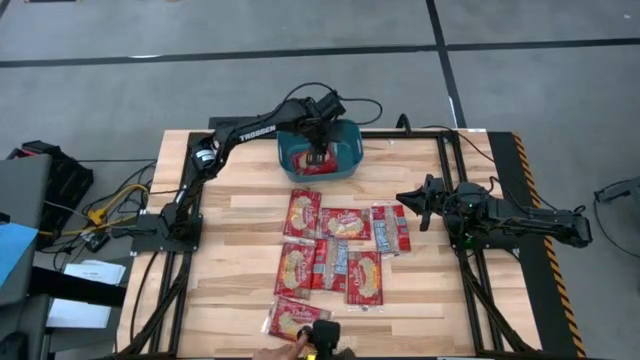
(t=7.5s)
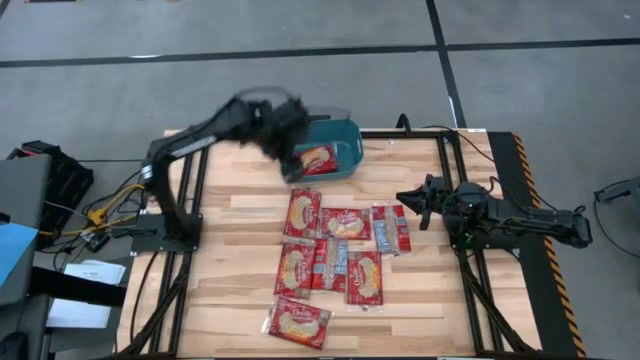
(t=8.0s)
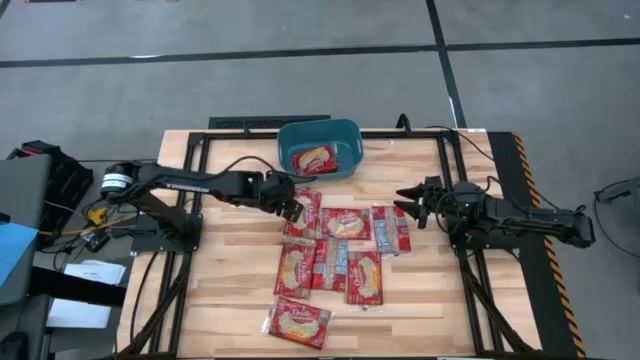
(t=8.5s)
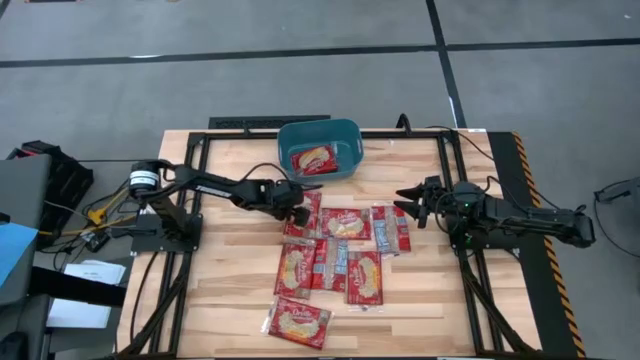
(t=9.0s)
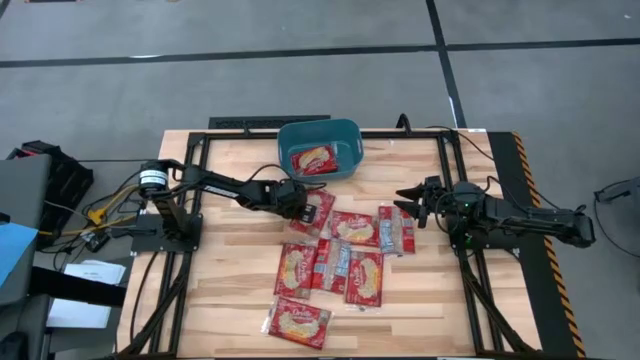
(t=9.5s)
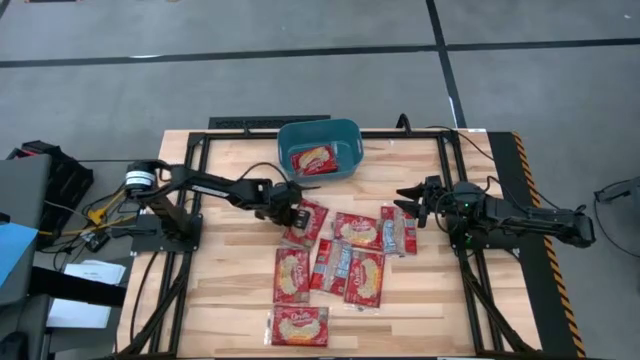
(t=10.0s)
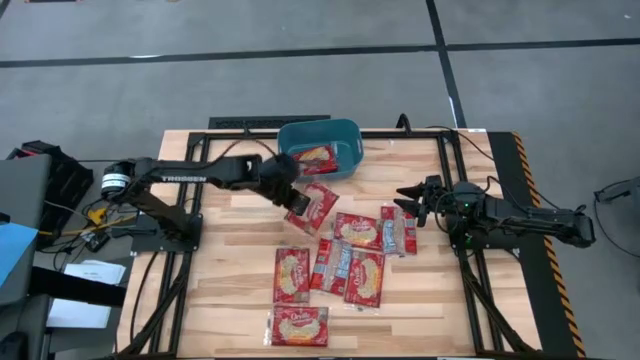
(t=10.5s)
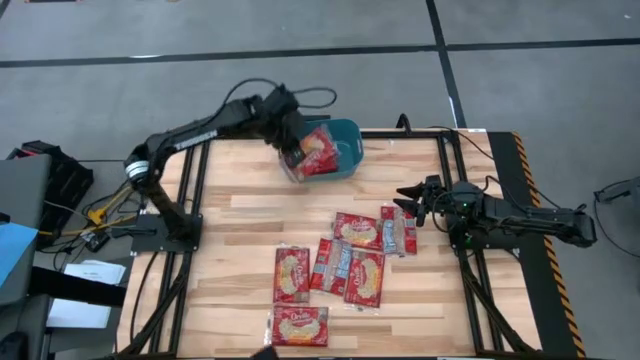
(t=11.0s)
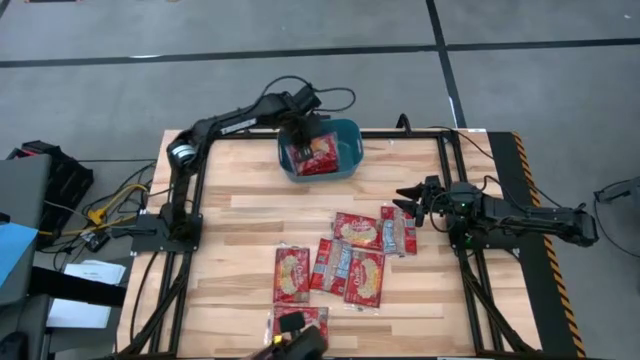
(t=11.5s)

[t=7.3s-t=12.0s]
Task: Sort popcorn bags into baskets
Put the red popcorn bag into the blue bin

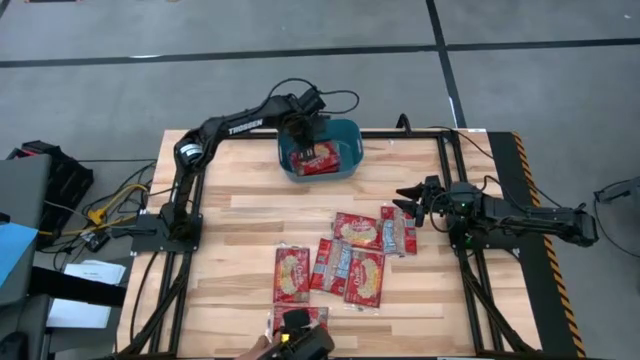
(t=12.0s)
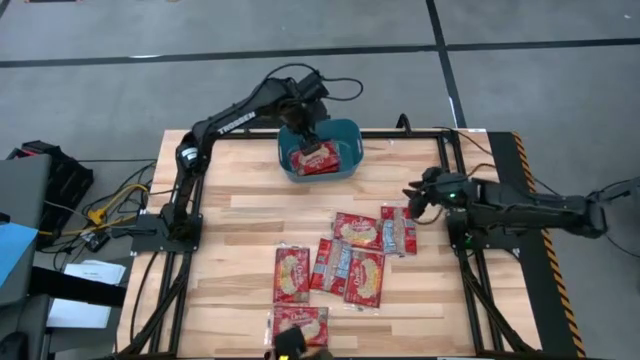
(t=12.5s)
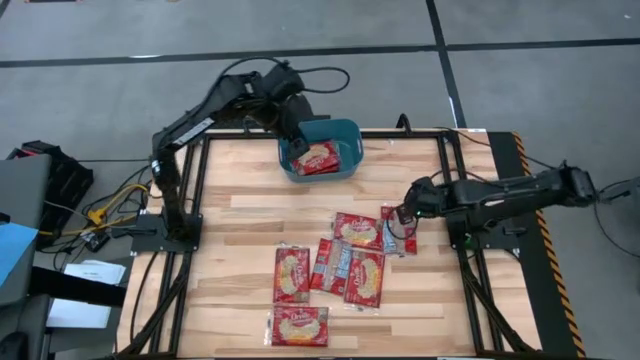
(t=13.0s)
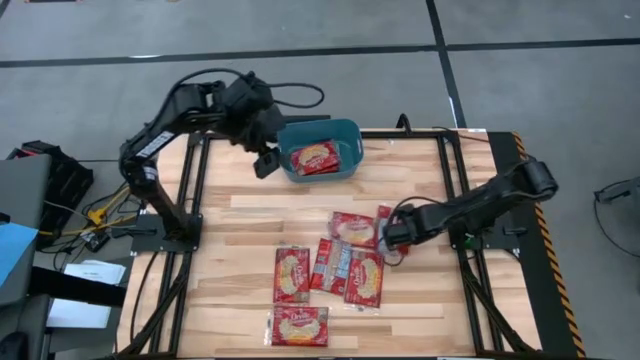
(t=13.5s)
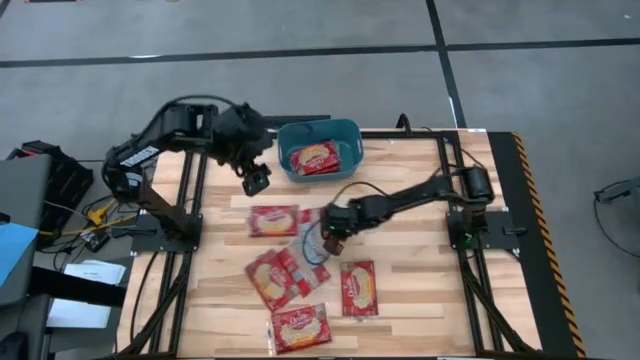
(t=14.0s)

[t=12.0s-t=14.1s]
Move the red popcorn bag to the center of the table

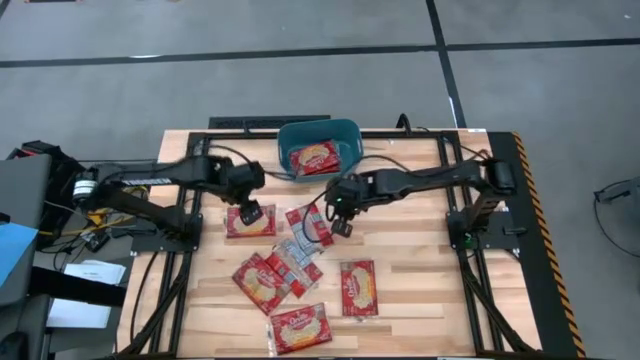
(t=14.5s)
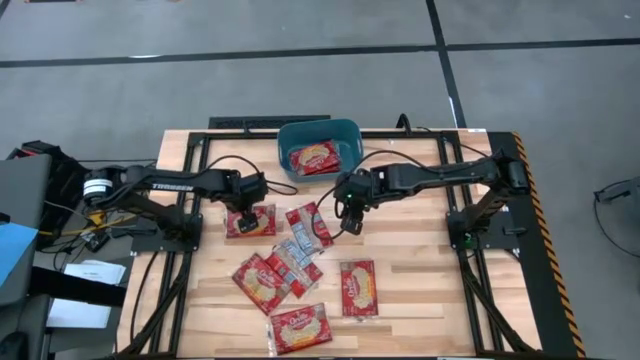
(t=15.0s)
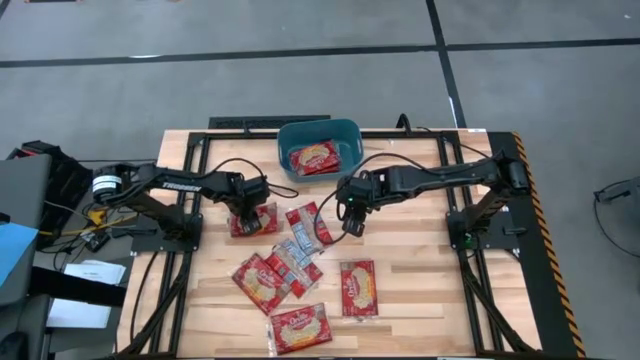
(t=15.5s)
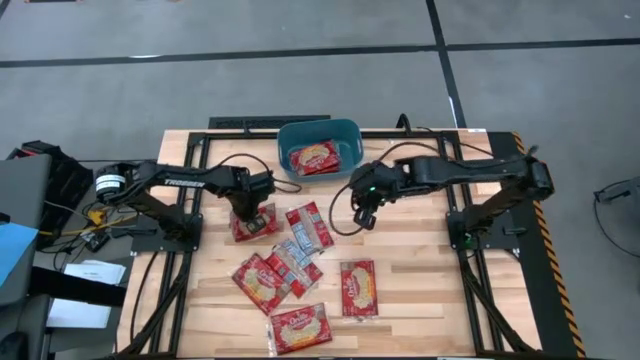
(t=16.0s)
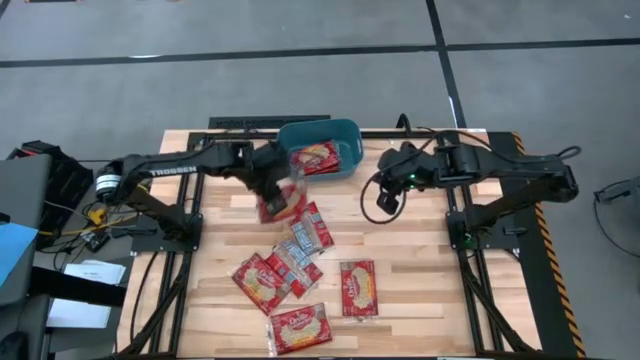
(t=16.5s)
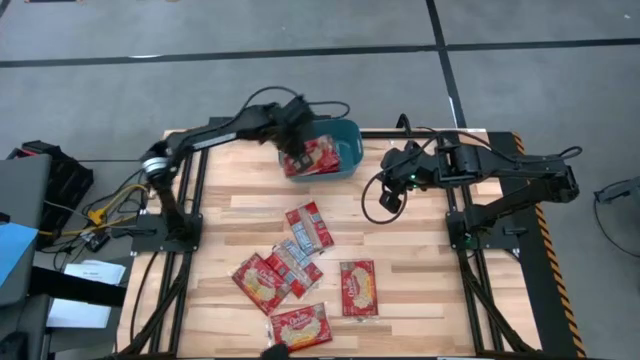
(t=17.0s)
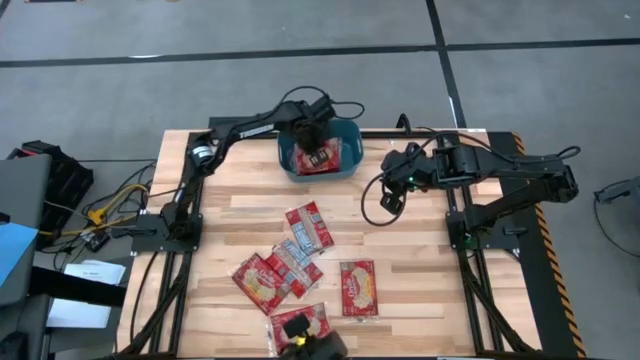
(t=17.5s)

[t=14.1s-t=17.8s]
Put the red popcorn bag into the blue bin

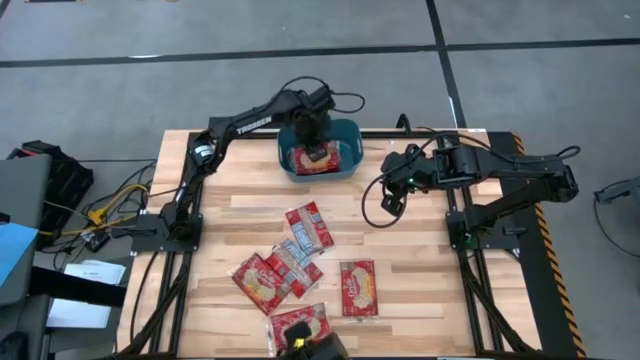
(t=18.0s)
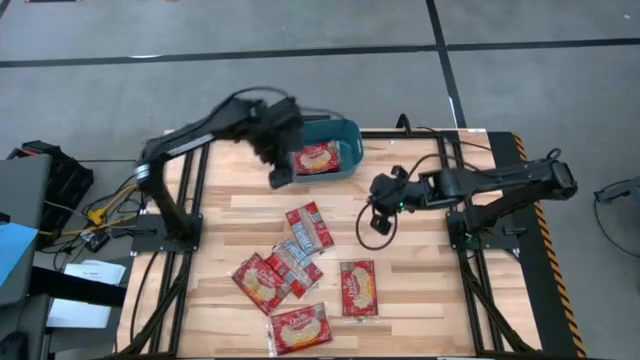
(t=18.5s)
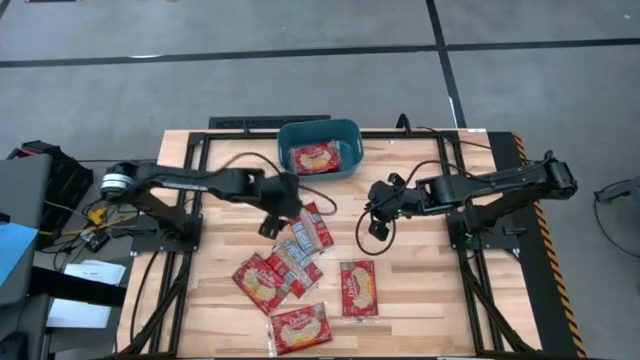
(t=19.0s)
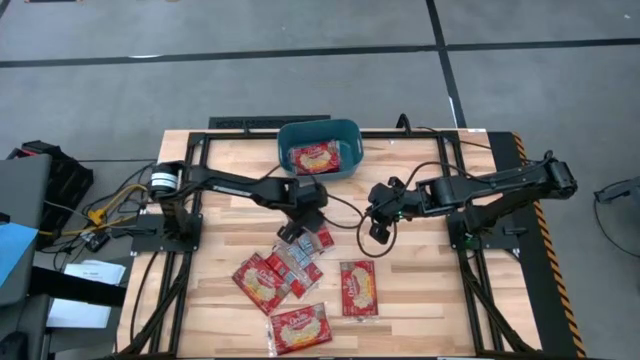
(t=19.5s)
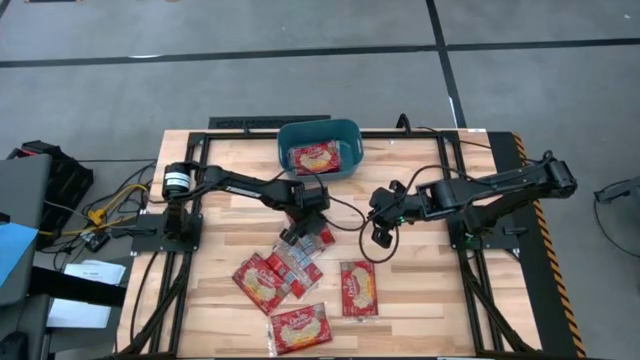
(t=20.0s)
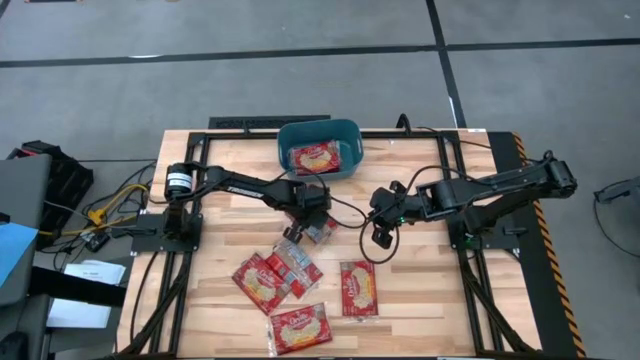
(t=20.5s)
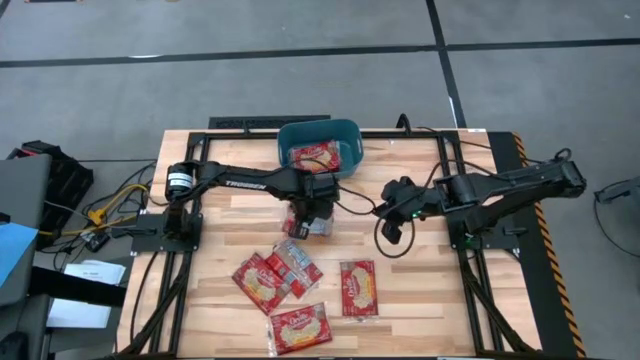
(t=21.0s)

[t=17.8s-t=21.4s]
Put the red popcorn bag into the blue bin

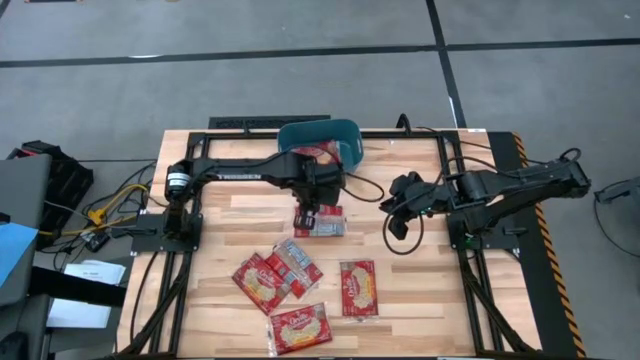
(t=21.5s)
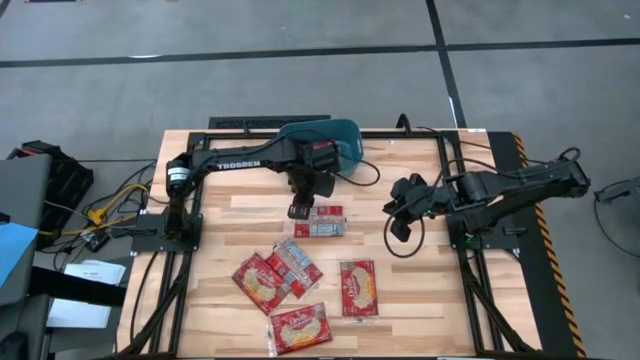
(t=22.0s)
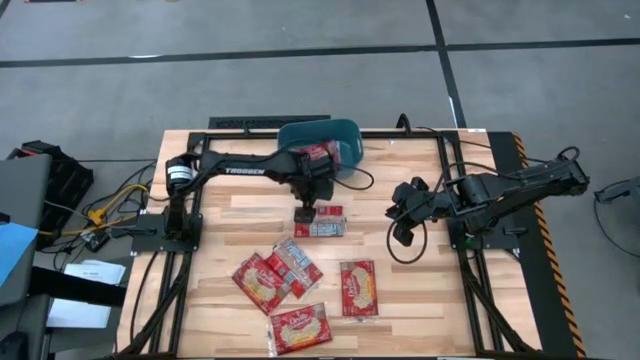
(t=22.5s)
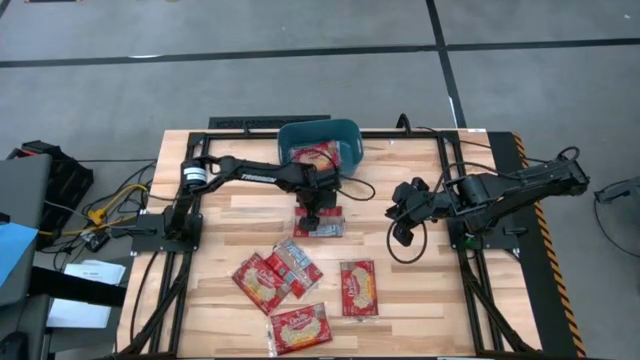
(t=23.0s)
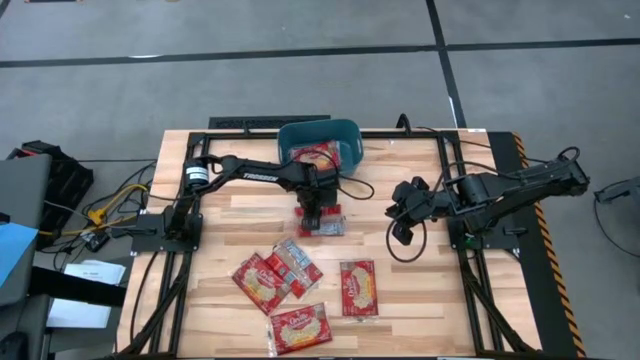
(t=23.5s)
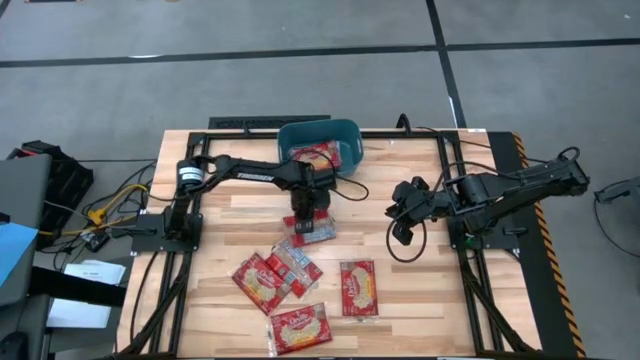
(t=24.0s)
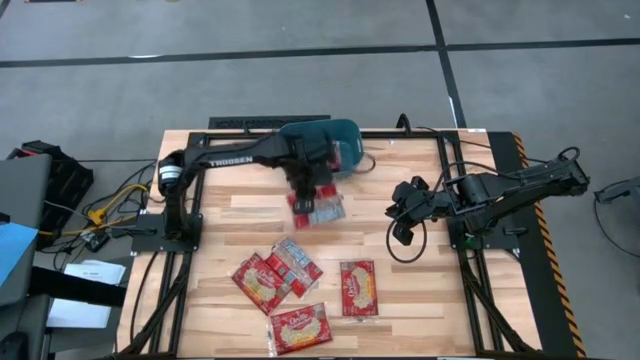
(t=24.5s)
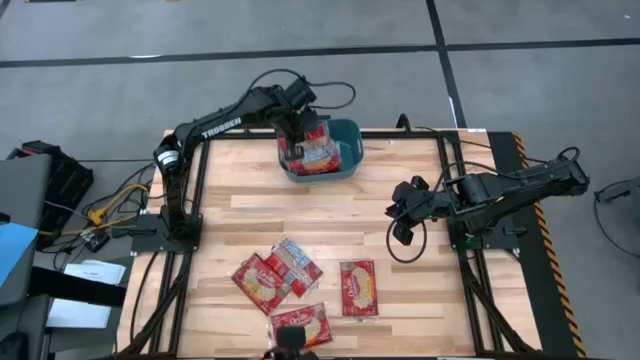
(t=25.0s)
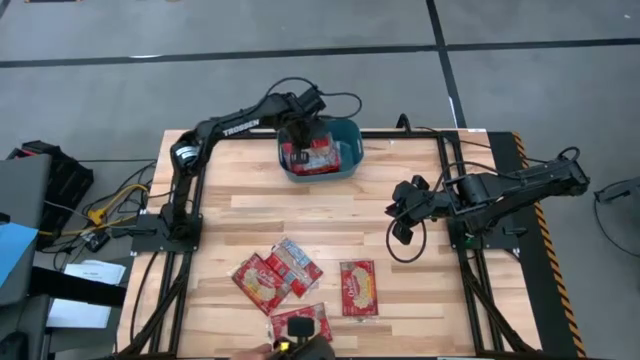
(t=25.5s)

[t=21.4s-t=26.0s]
Put the red popcorn bag into the blue bin

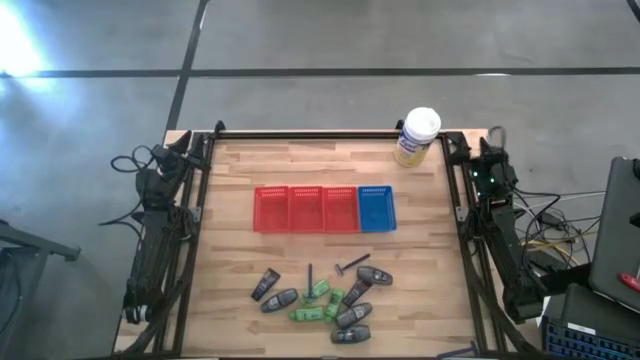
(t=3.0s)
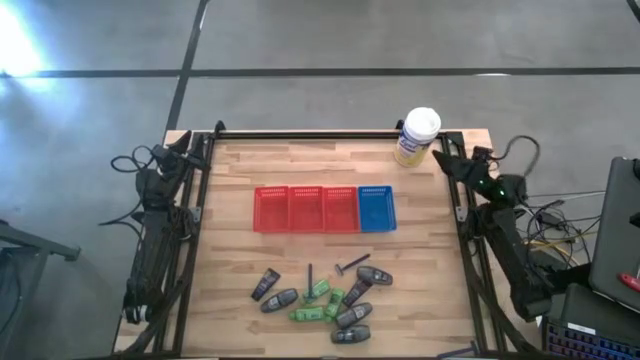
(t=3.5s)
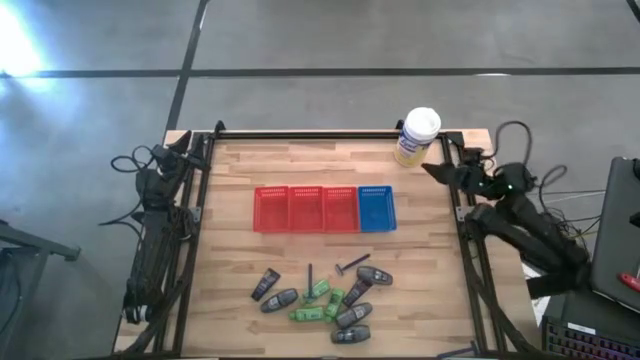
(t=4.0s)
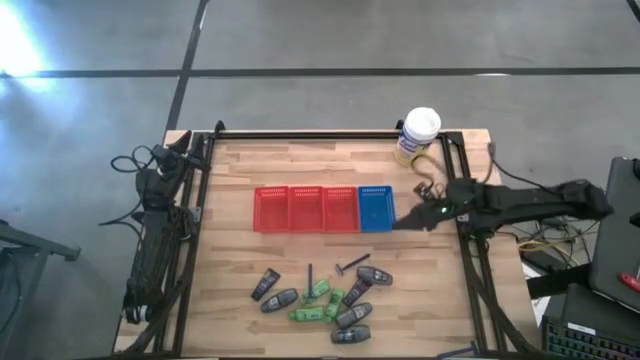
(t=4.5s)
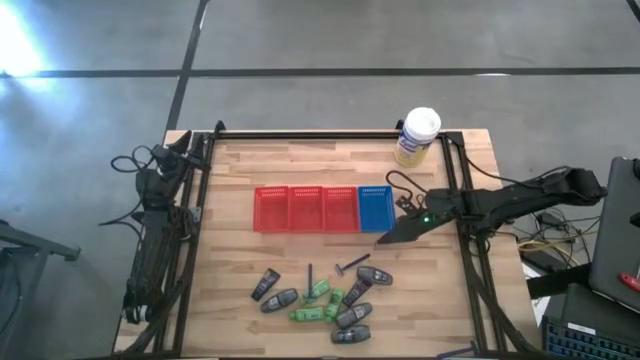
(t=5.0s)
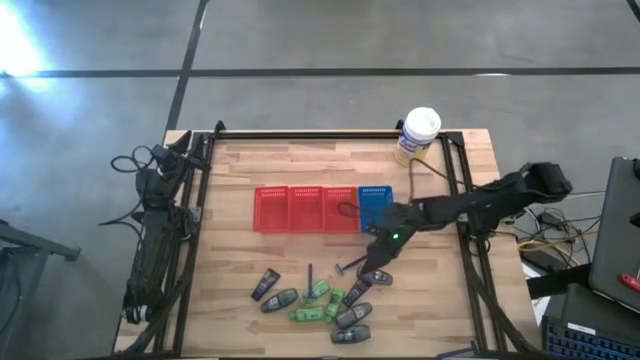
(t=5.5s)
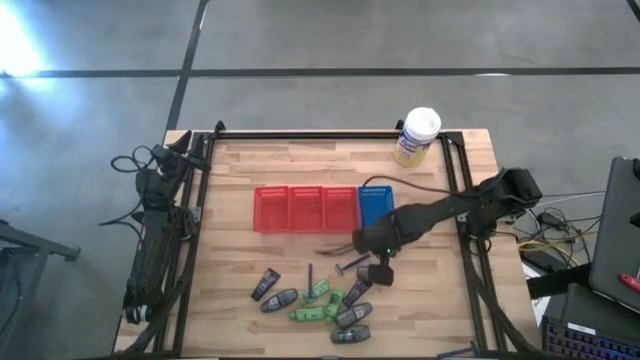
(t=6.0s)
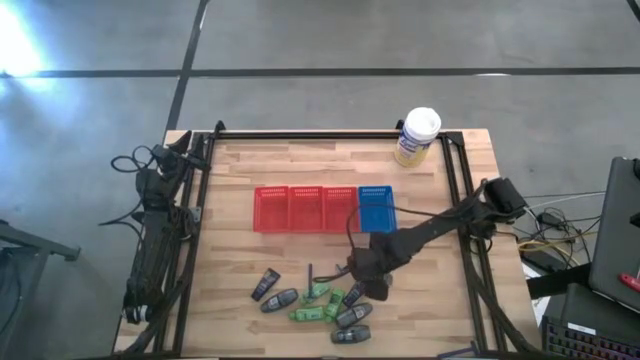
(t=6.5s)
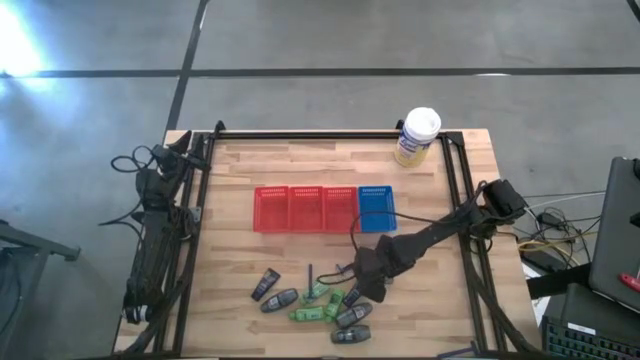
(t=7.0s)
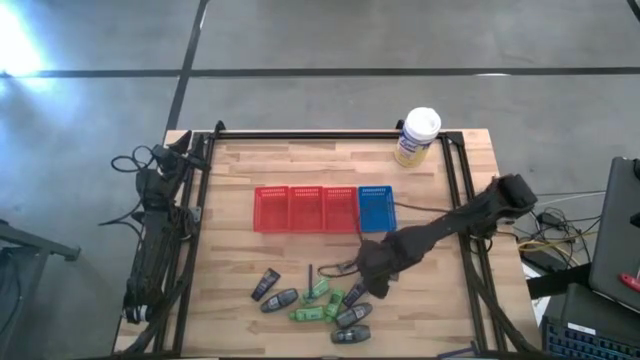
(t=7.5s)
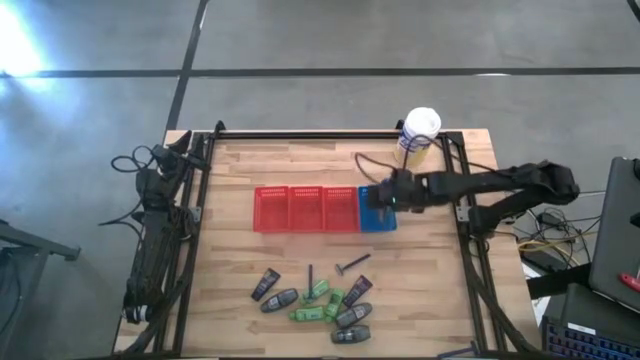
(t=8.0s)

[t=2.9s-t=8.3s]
Task: Pick & Place Travel size toiletries
Put the black deodorant into the blue bin
